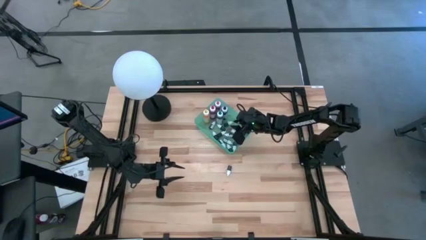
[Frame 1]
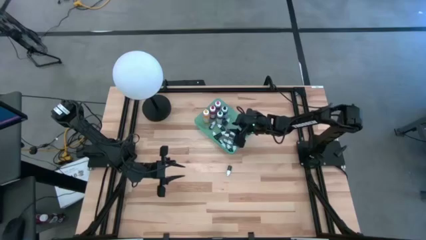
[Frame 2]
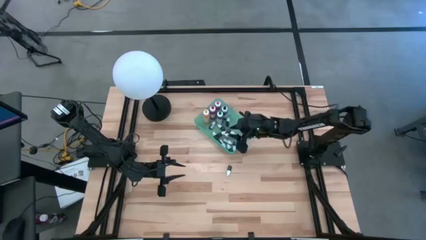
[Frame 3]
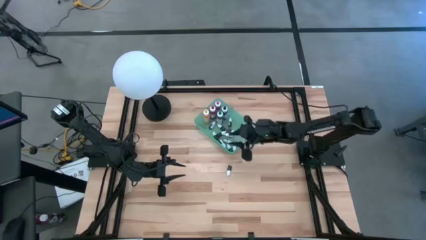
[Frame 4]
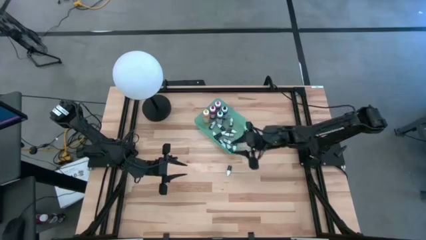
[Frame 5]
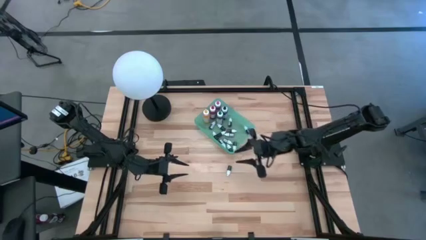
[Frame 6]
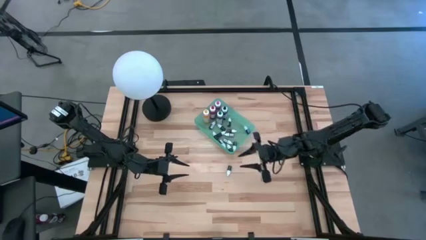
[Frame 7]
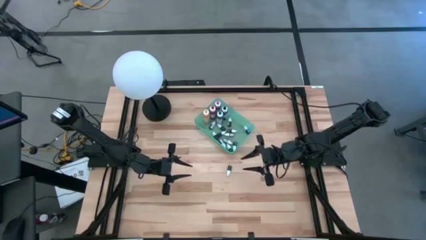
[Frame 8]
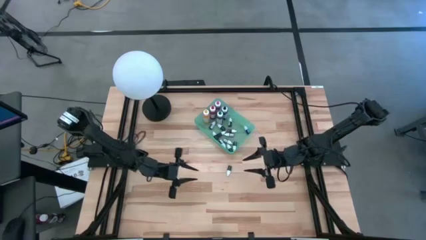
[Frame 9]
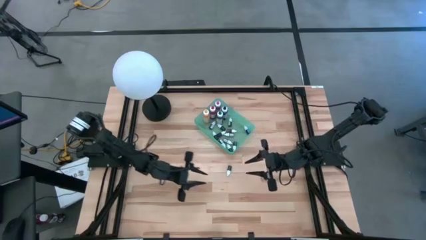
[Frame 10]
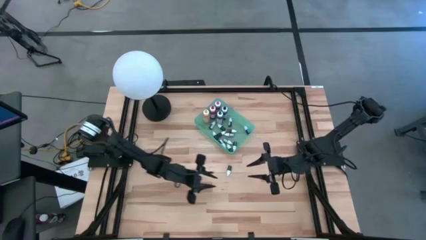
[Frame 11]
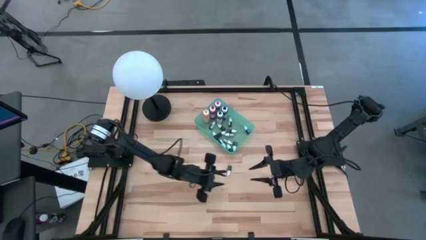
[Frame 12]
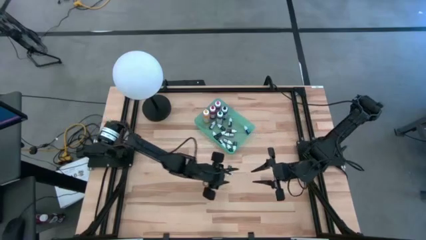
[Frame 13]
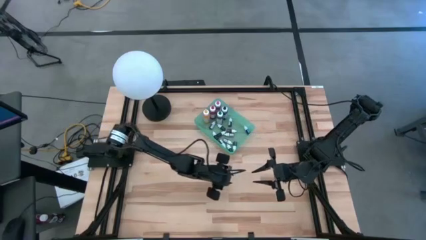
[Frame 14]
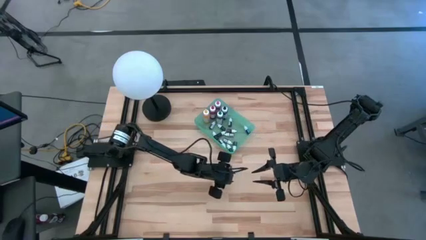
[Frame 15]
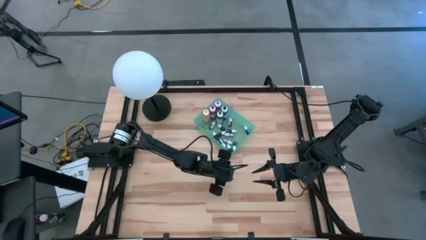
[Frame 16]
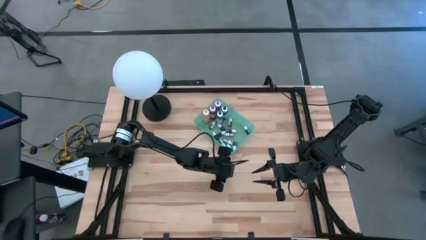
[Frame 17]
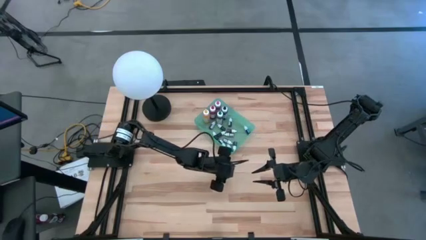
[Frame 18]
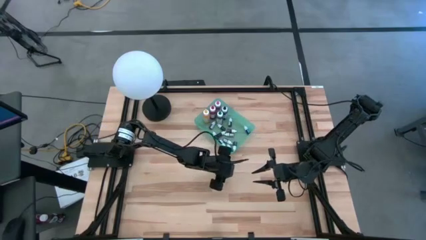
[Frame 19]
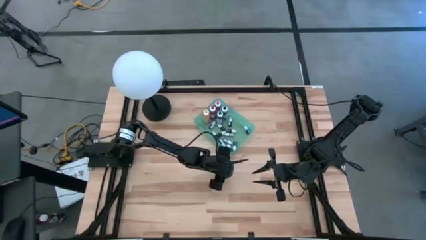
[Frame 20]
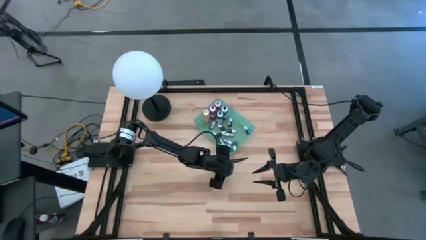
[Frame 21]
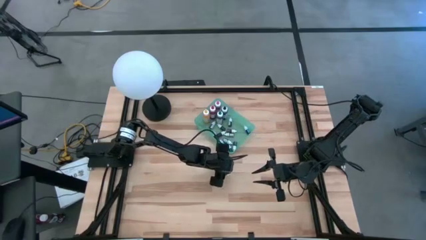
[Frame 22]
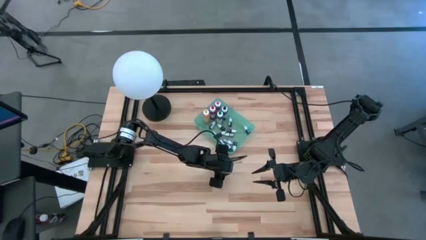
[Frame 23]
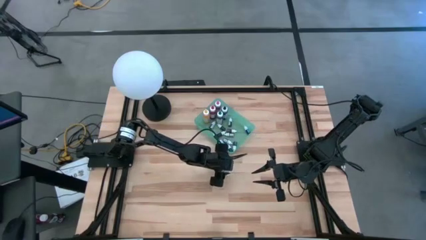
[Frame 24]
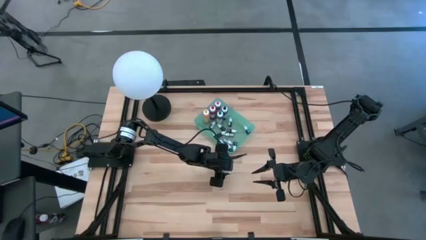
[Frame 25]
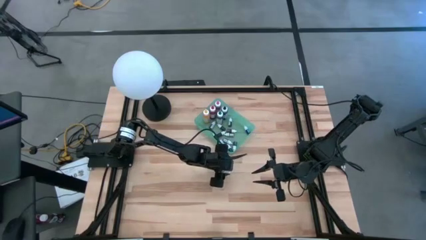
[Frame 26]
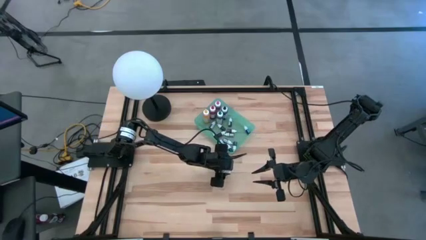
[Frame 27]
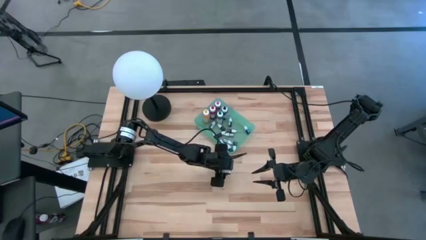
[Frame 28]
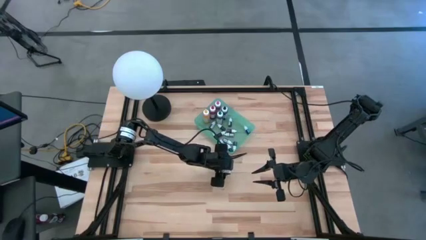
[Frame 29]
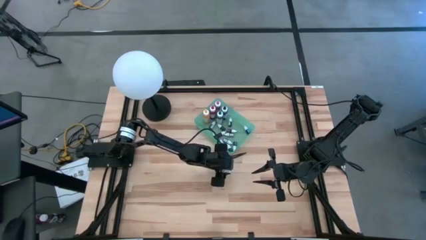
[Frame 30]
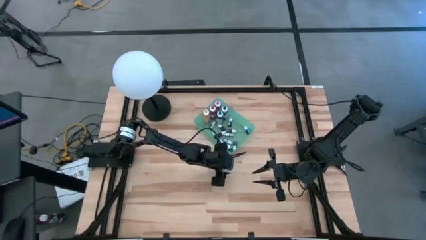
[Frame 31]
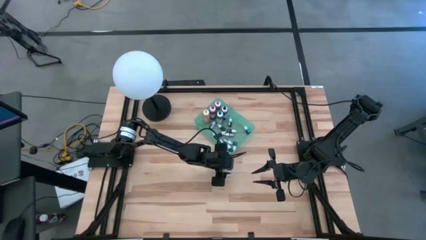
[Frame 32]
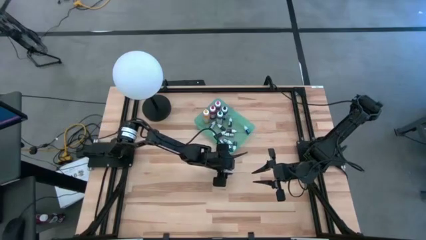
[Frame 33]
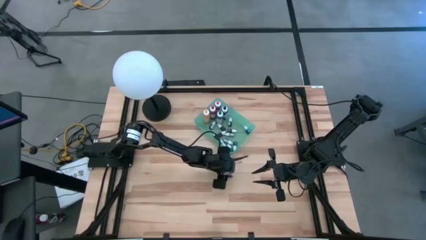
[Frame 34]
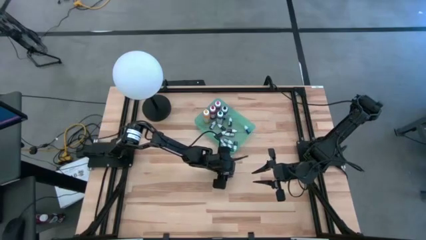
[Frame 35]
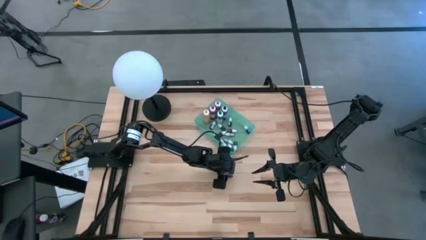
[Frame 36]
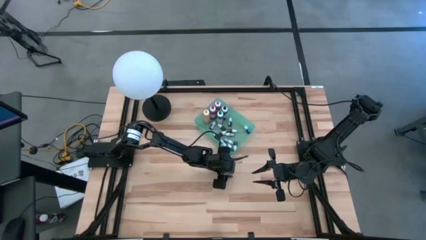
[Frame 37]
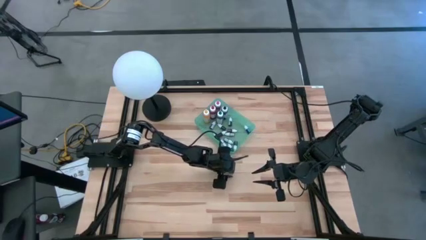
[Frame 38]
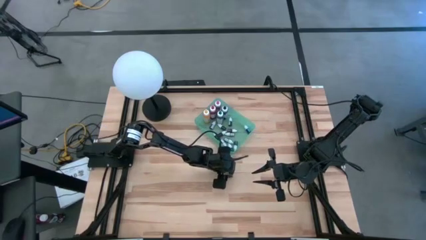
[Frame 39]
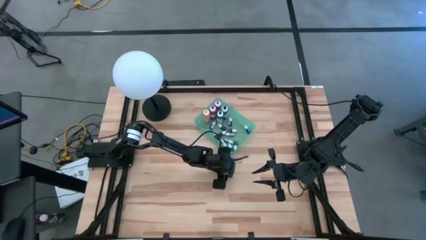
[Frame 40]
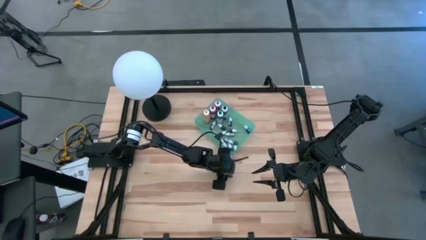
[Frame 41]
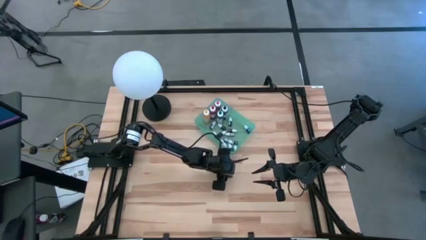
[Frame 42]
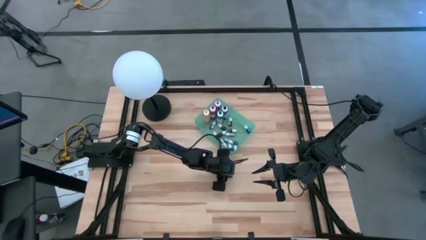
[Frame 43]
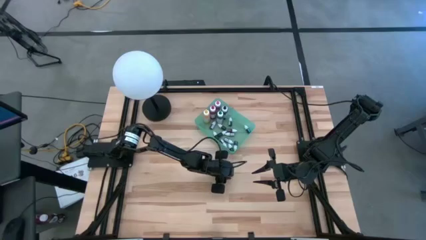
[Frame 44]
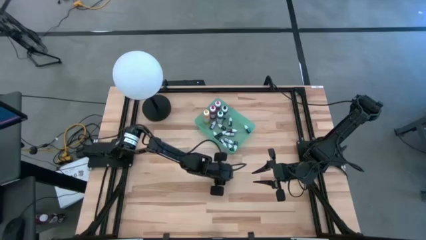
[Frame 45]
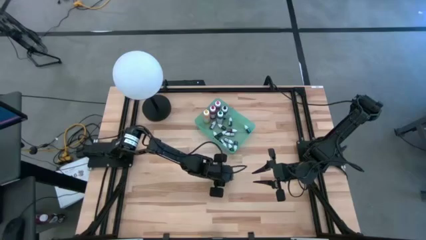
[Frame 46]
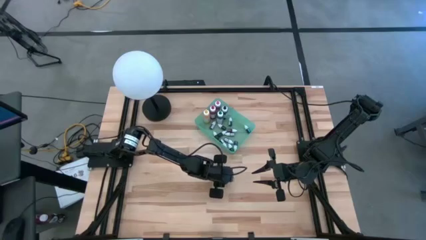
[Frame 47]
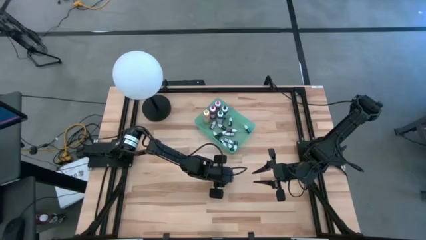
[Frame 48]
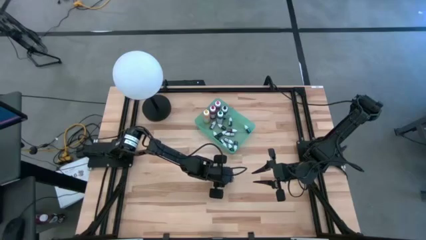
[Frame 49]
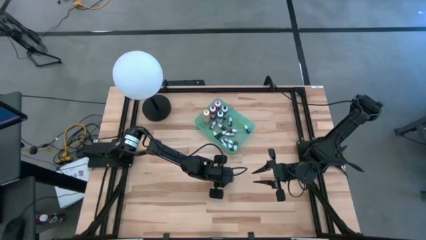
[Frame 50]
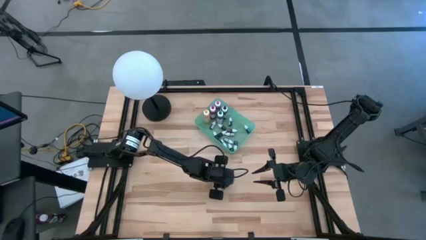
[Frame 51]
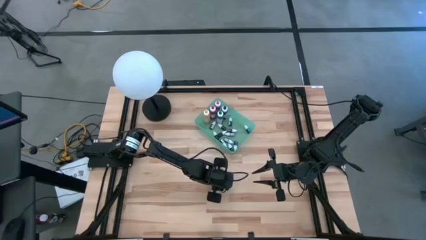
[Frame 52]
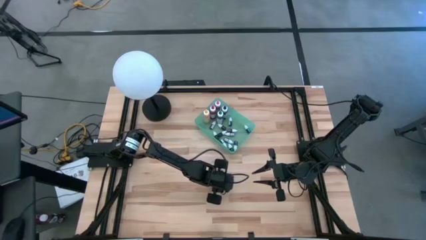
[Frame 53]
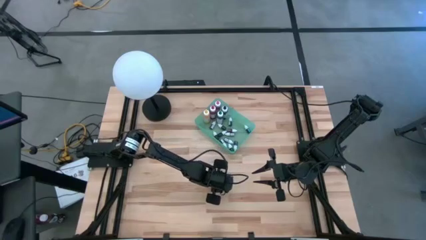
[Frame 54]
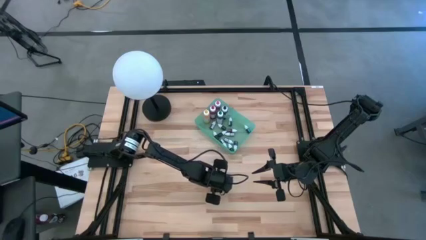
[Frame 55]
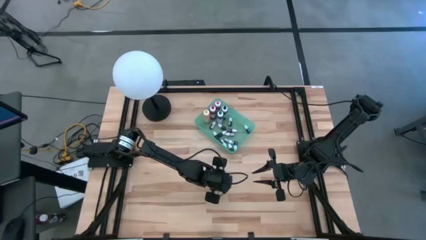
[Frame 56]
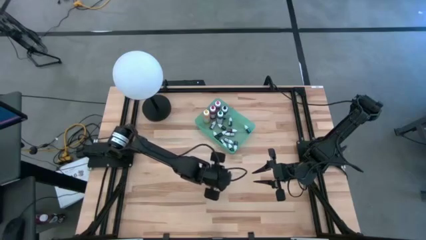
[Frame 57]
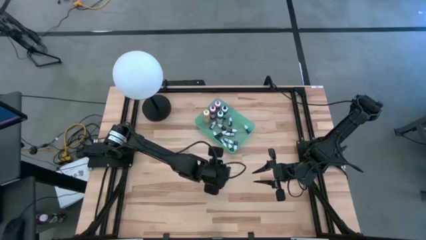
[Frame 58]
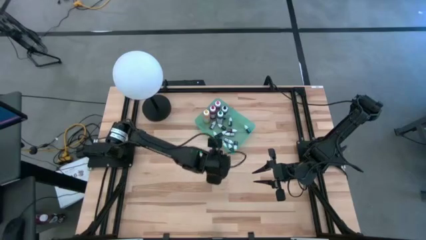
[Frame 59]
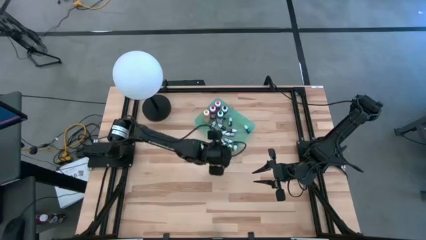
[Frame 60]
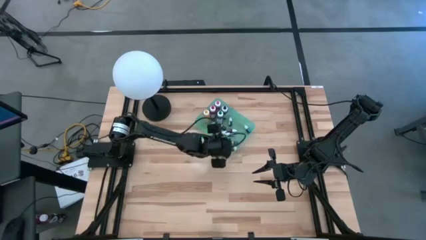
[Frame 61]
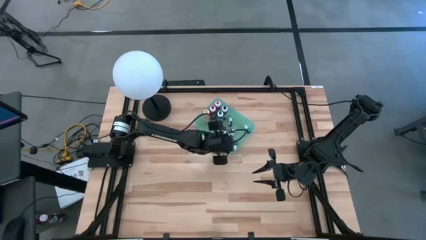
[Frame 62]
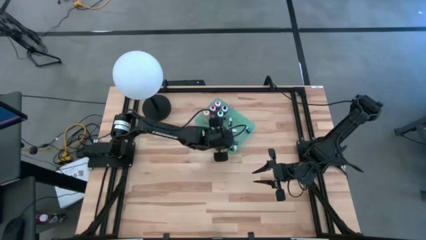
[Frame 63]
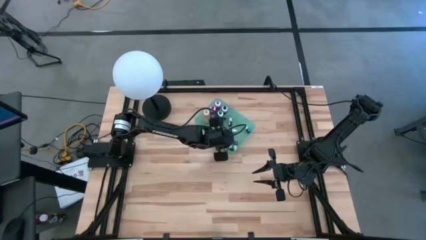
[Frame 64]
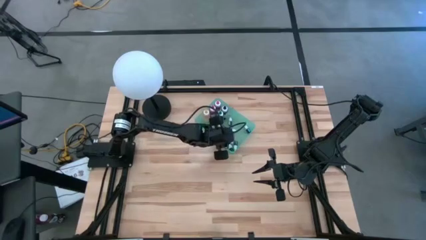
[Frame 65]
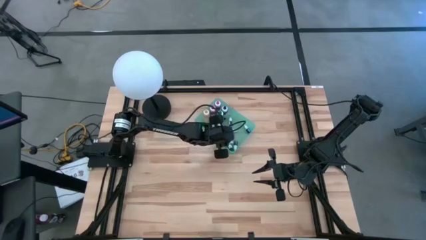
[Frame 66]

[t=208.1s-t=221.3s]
Task: Pick & Place food coloring
Put the small black food coloring bottle into the green bin
